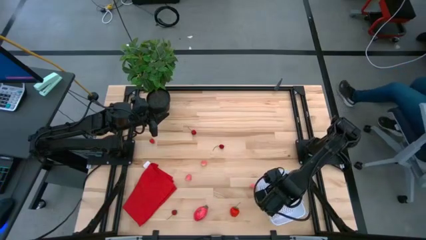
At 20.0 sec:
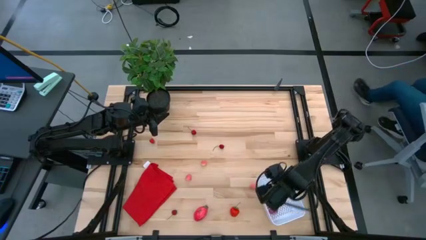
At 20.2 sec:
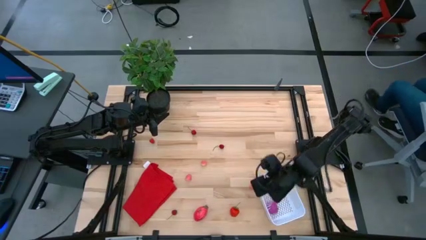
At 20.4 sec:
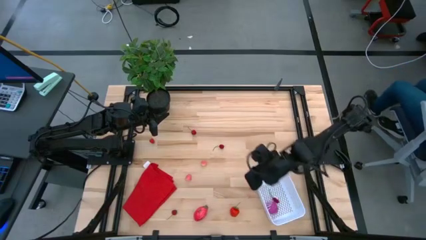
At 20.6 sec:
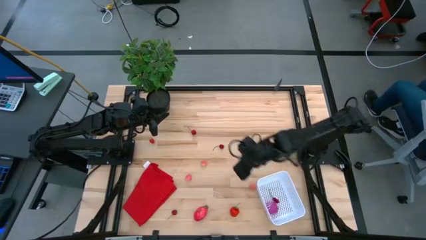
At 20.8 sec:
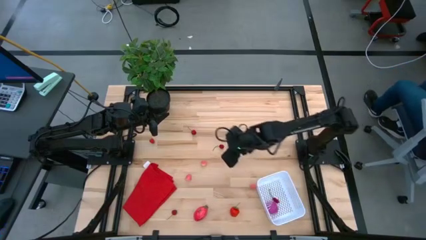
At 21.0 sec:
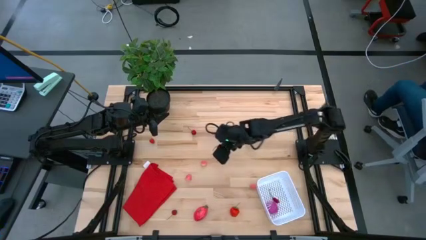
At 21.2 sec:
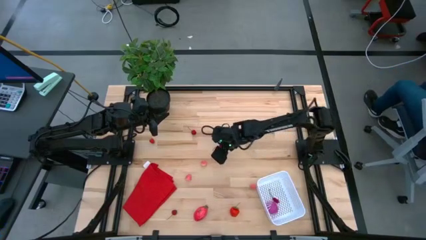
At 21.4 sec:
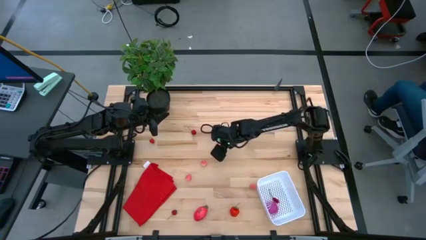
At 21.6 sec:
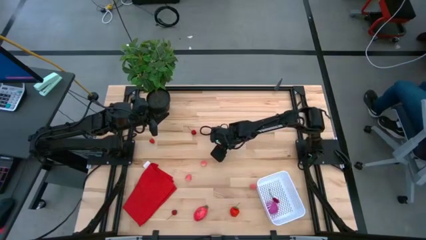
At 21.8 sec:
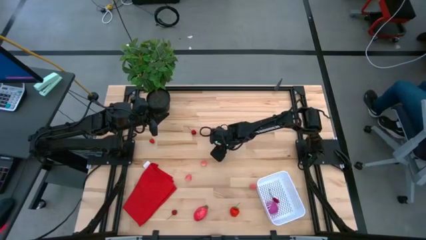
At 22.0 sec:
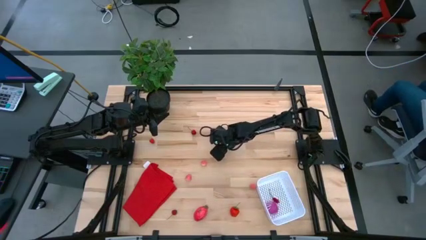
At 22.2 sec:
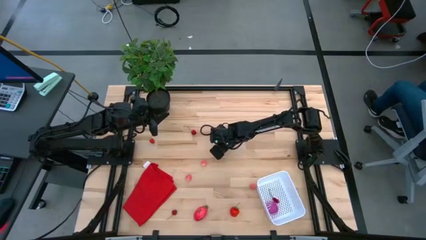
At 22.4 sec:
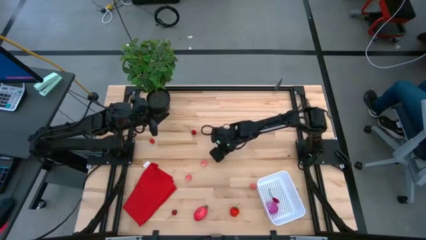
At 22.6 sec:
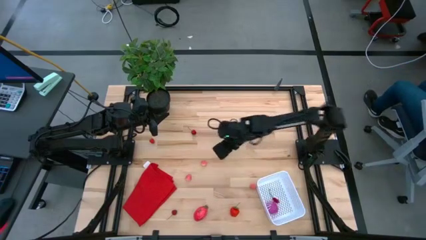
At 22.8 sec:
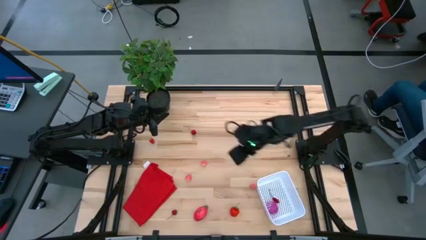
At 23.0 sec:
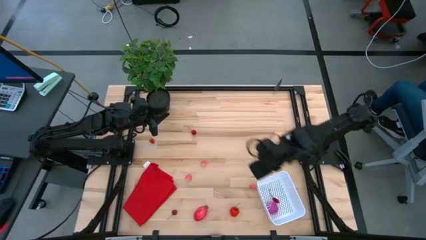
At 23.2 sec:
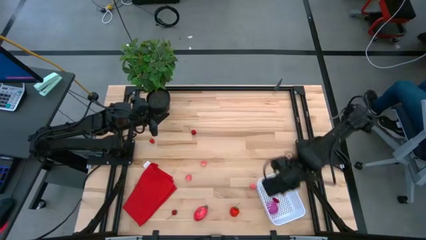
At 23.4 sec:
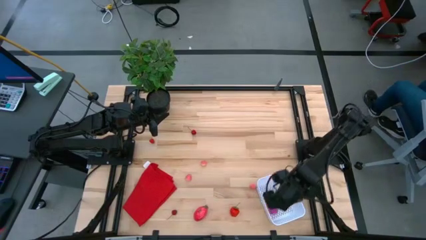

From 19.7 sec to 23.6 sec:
Task: Pick and placing Produce into tupperware
Put the red cherry into the white basket

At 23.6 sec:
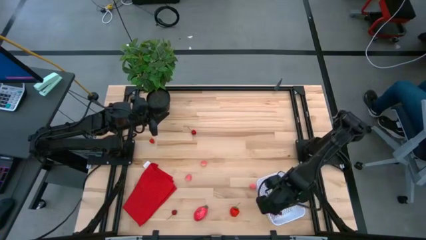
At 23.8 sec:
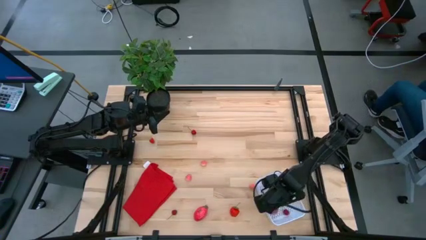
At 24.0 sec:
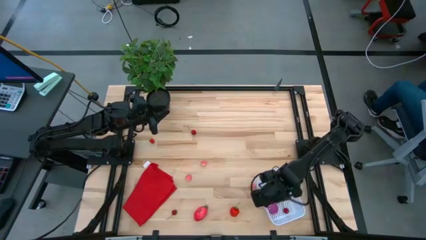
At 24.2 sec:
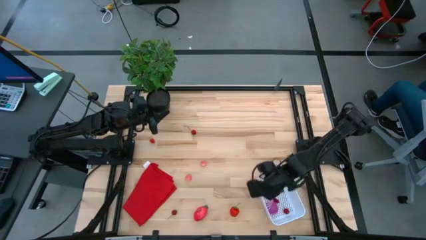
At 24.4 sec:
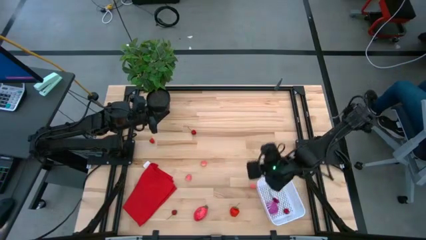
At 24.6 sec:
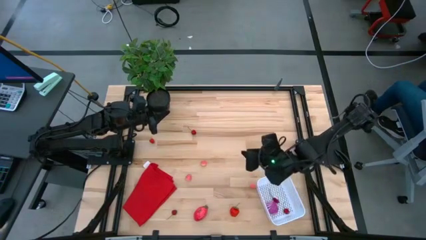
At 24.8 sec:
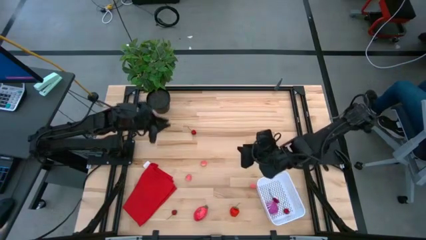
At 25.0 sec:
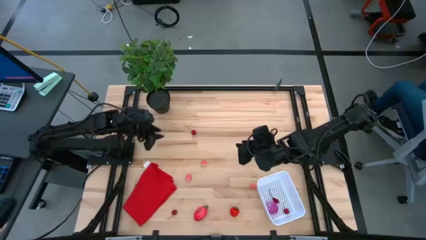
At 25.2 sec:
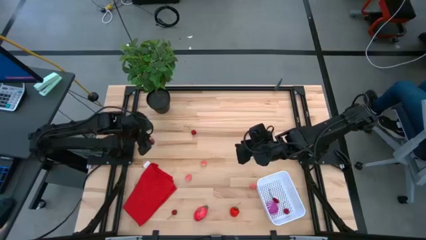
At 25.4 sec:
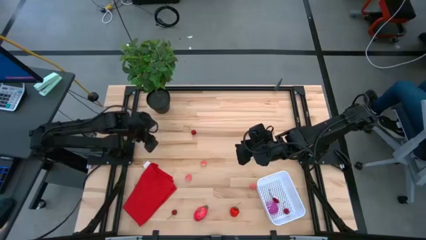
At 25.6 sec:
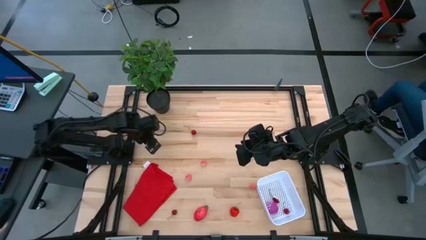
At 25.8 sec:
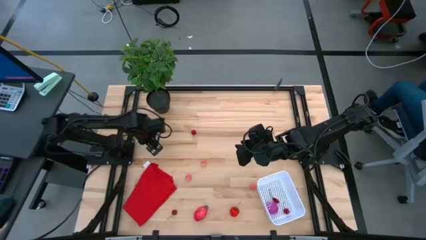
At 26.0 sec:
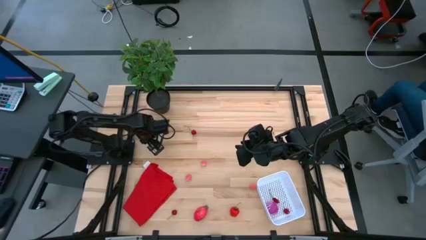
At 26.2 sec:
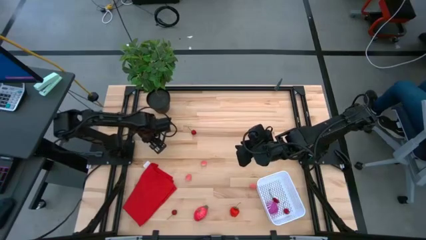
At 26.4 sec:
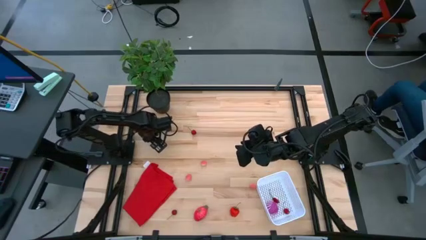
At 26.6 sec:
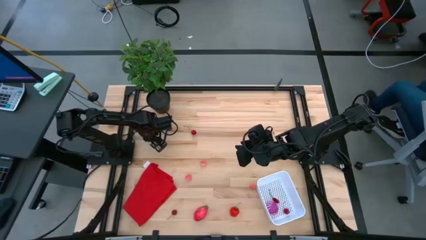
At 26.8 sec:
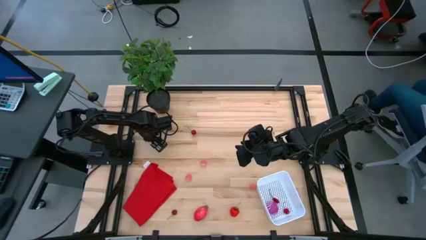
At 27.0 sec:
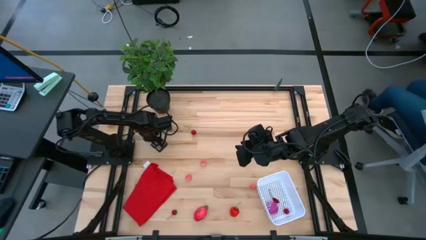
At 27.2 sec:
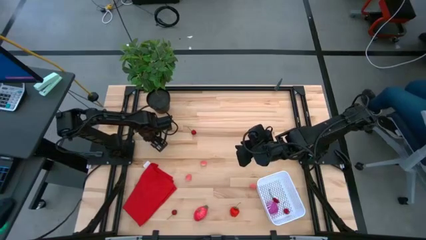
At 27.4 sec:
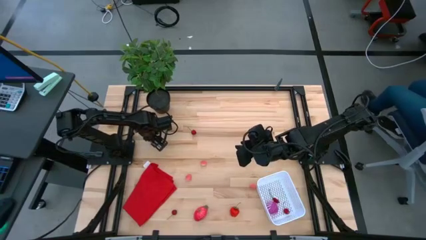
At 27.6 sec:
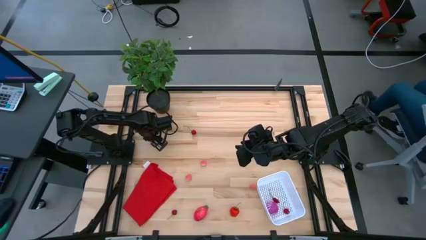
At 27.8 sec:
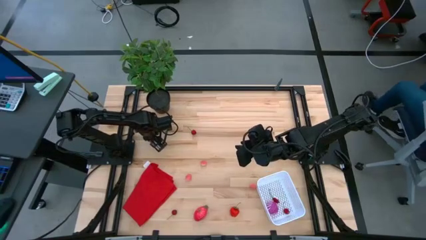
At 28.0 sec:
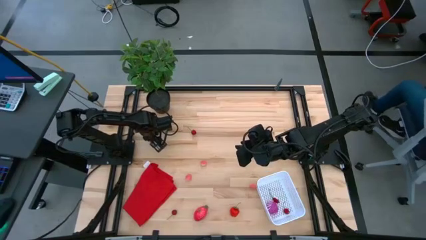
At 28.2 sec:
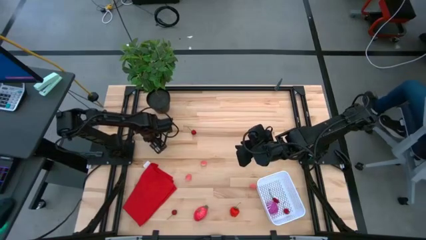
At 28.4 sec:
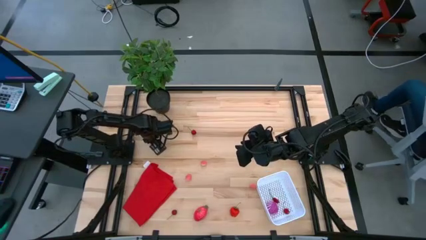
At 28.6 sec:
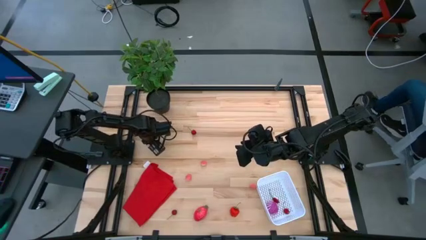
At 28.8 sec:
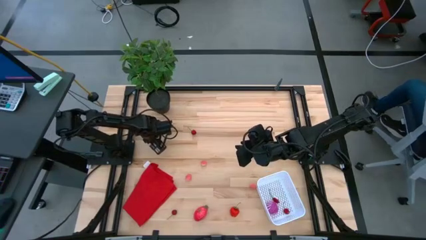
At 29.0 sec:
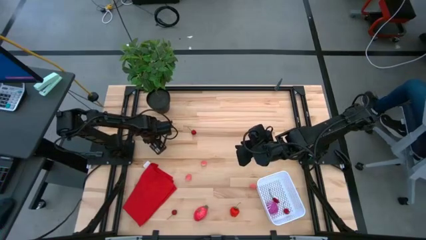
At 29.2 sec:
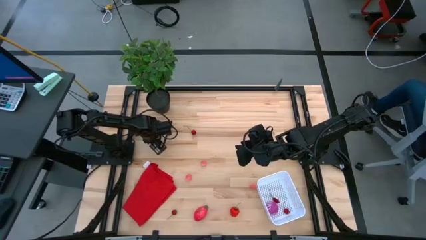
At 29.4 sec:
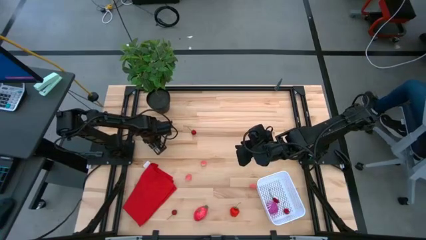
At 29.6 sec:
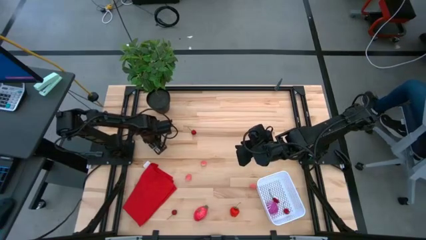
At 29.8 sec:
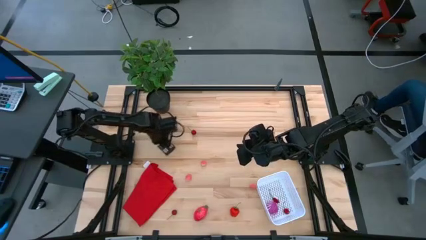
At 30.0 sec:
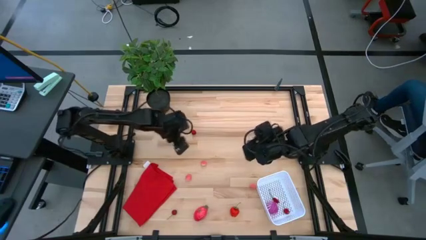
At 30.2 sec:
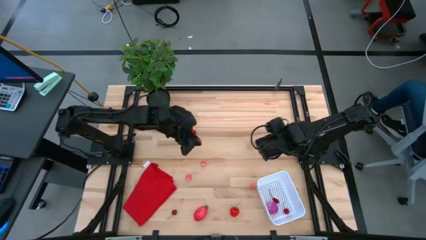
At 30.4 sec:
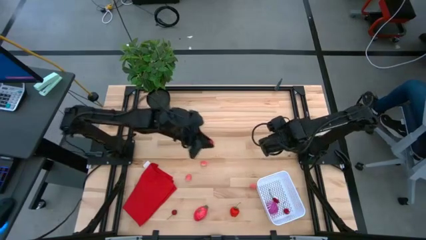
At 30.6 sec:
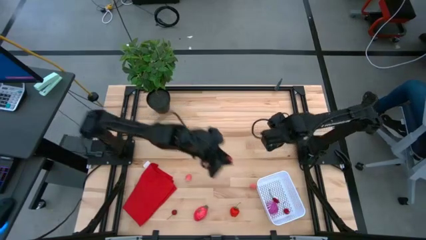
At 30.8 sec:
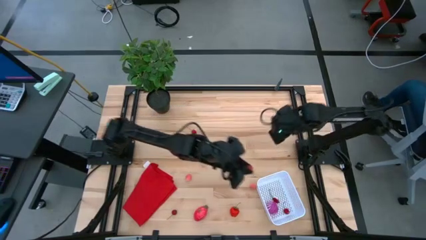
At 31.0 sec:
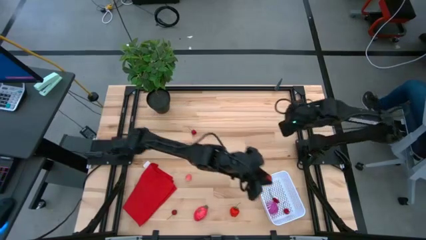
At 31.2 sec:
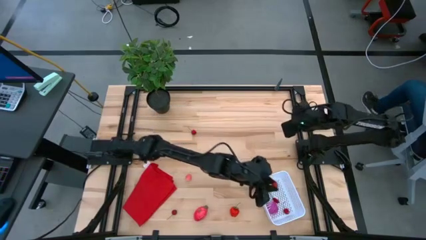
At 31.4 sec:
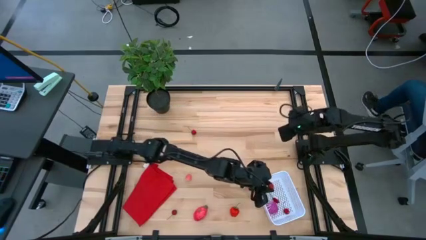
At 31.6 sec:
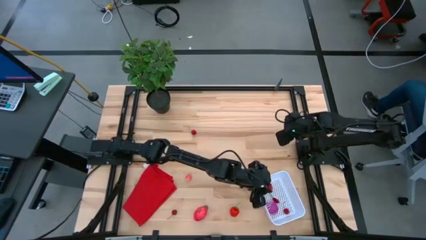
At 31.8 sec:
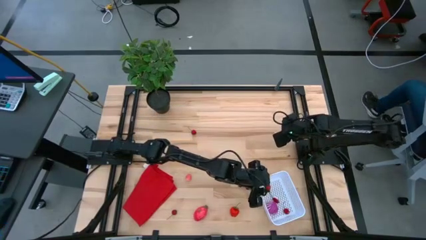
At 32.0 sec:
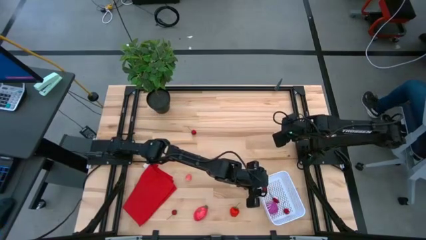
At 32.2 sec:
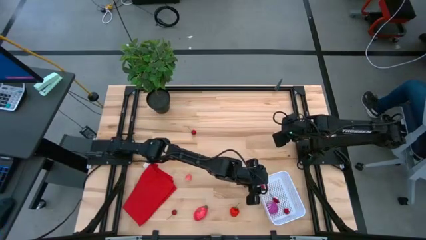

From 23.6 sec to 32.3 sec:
Put the red raspberry into the white basket

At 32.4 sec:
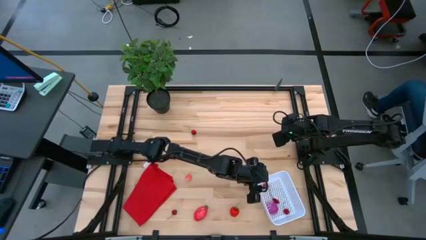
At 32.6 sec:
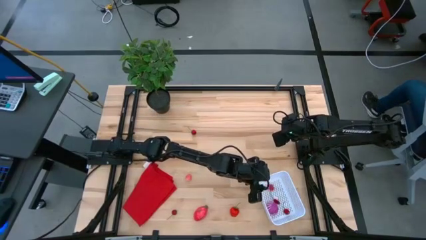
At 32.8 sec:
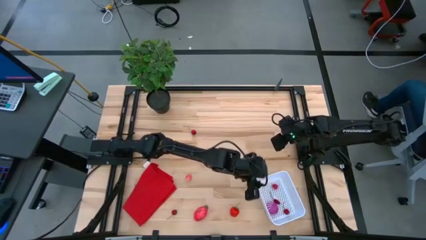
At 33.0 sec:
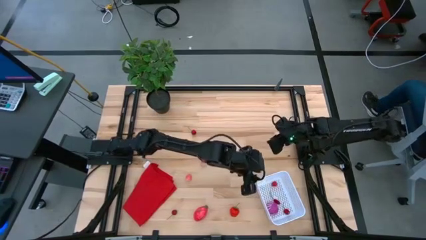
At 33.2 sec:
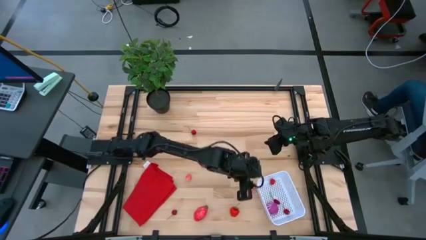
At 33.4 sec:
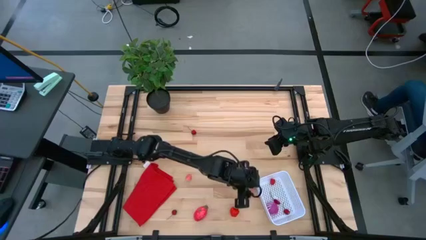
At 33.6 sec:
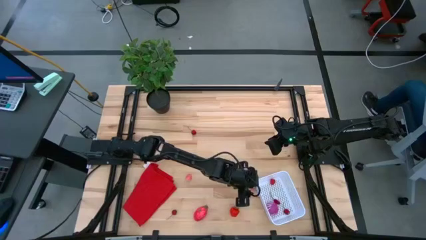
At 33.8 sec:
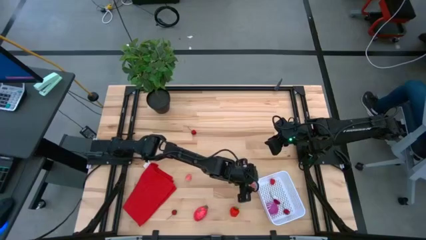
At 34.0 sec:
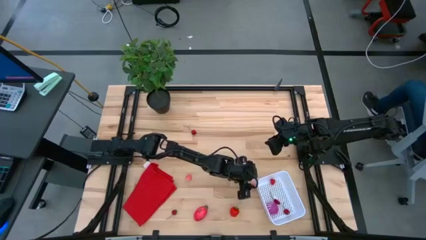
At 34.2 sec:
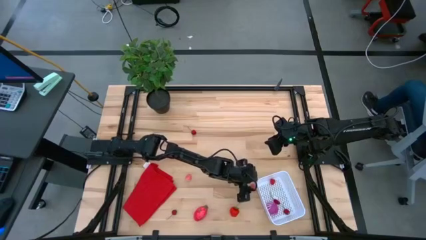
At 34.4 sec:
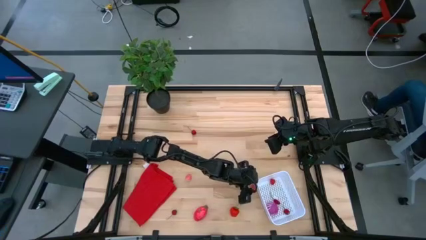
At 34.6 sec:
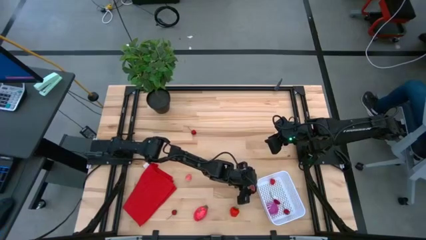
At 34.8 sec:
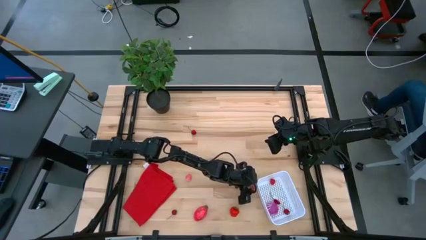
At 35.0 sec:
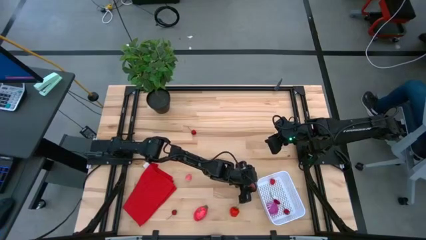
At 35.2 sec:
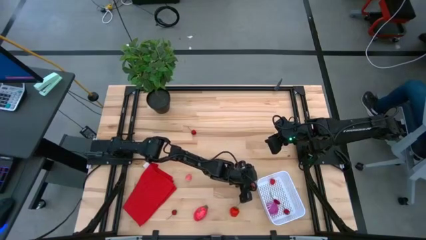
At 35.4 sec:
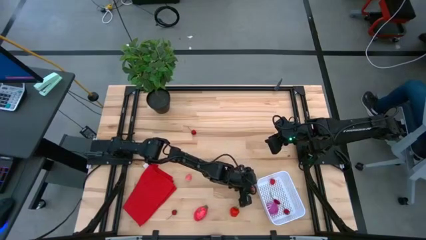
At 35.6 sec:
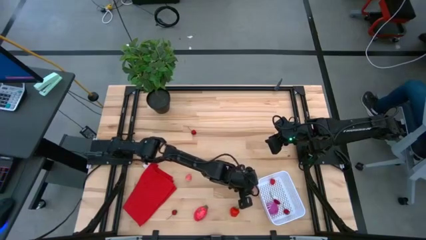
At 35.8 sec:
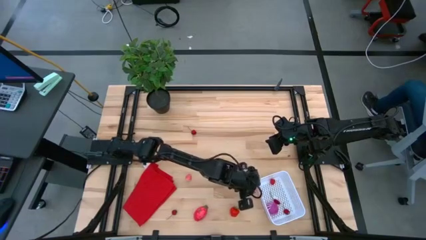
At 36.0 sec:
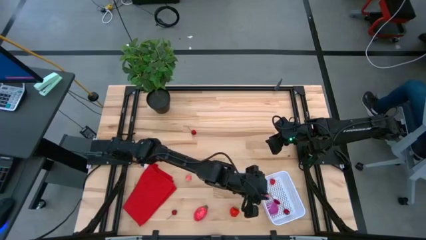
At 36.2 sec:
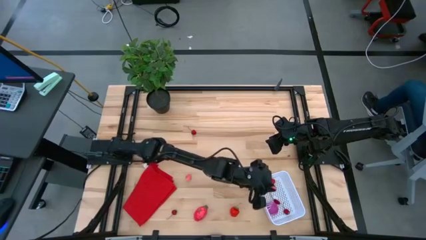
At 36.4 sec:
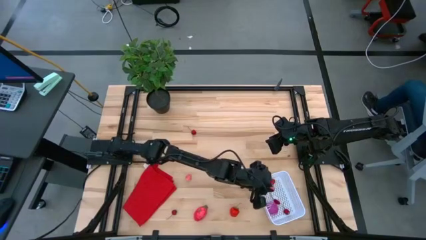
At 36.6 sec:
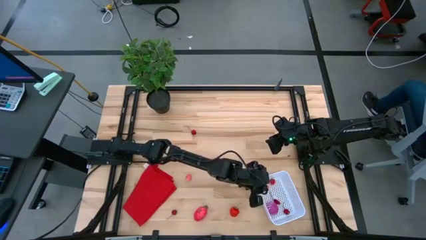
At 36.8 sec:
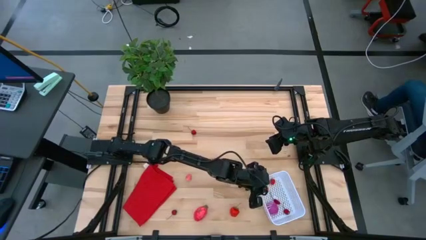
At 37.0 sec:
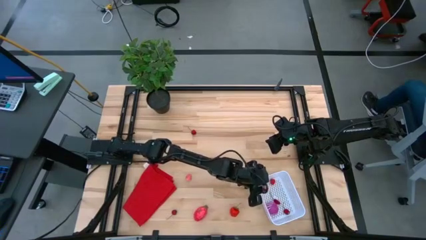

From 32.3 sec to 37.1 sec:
Put the peach into the white basket
